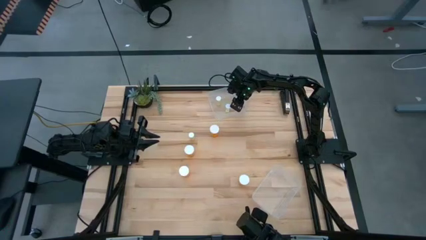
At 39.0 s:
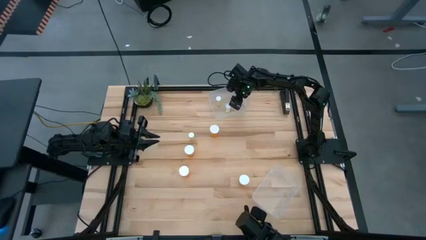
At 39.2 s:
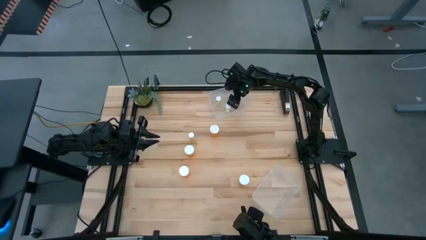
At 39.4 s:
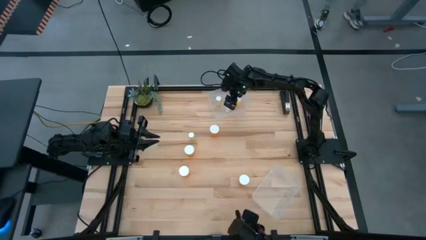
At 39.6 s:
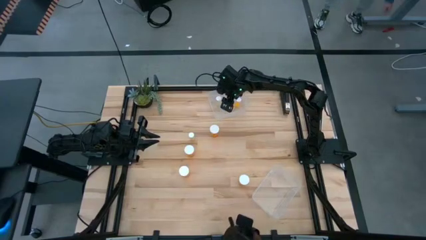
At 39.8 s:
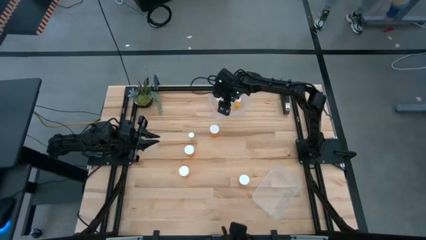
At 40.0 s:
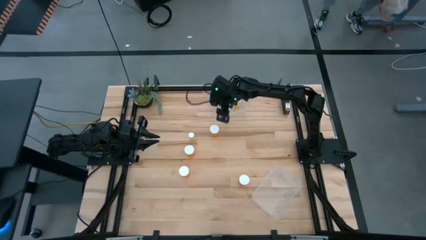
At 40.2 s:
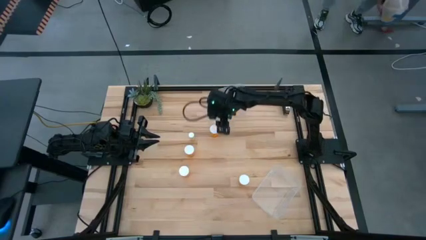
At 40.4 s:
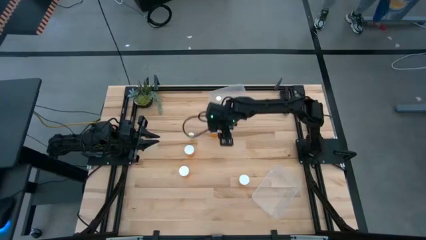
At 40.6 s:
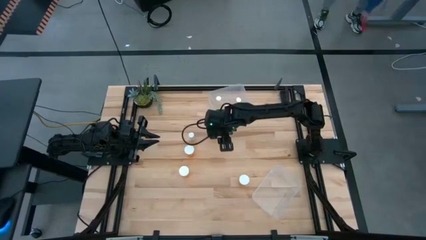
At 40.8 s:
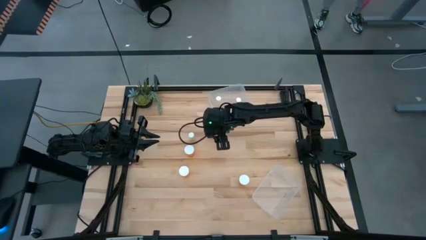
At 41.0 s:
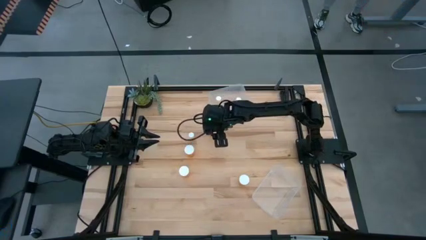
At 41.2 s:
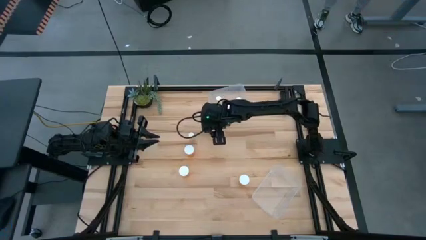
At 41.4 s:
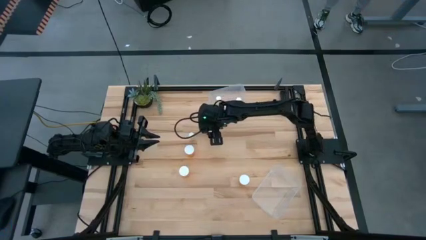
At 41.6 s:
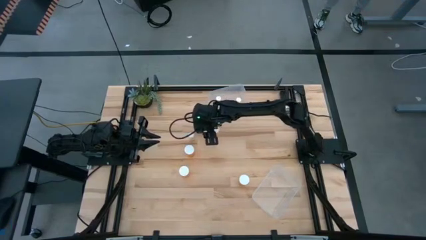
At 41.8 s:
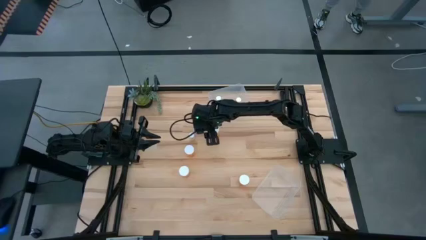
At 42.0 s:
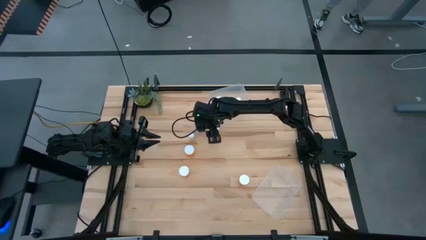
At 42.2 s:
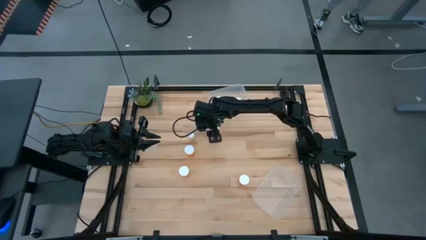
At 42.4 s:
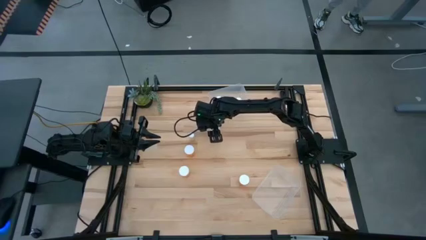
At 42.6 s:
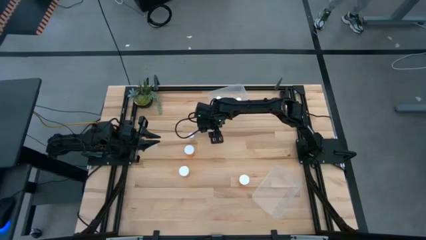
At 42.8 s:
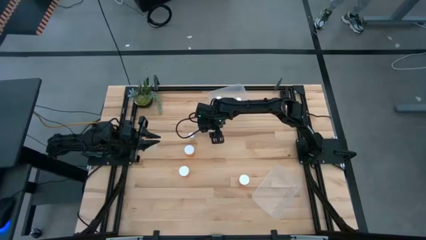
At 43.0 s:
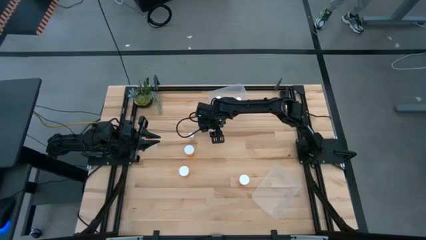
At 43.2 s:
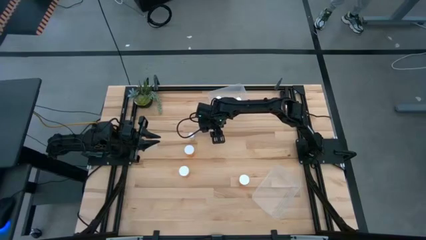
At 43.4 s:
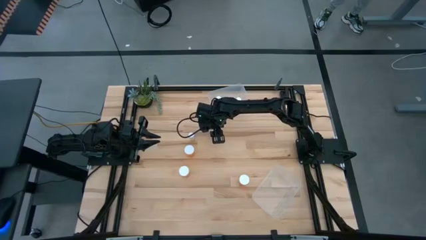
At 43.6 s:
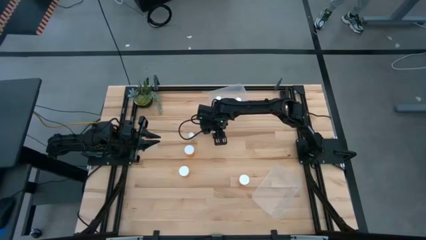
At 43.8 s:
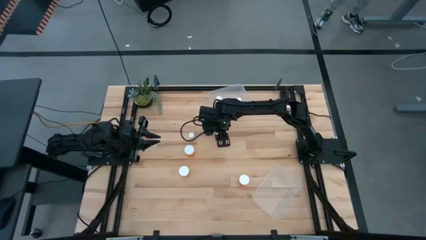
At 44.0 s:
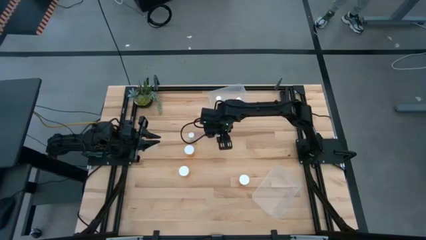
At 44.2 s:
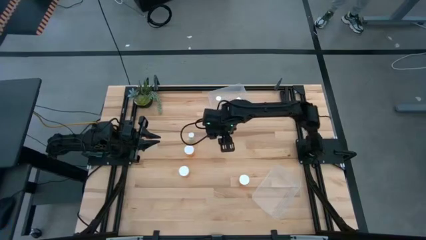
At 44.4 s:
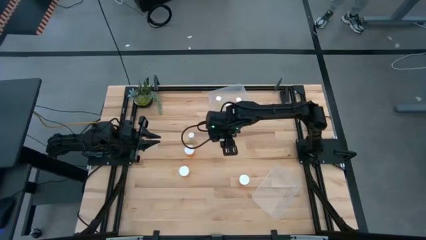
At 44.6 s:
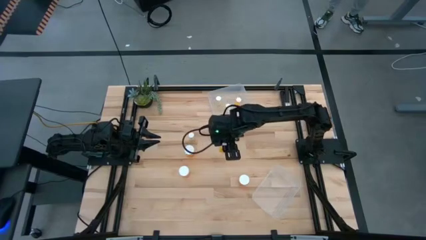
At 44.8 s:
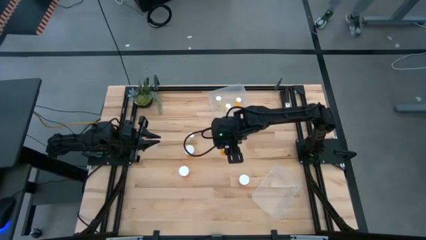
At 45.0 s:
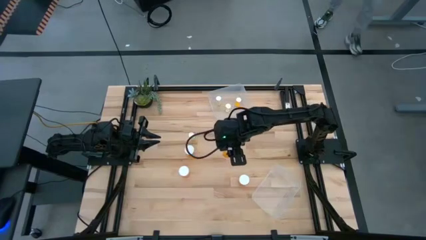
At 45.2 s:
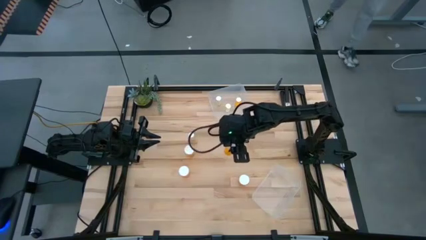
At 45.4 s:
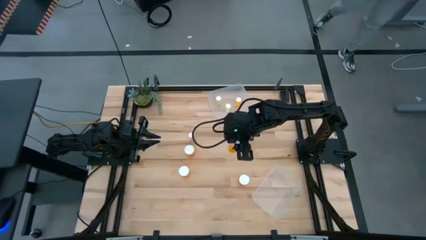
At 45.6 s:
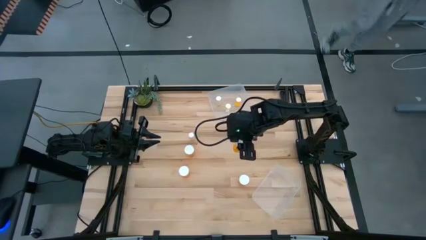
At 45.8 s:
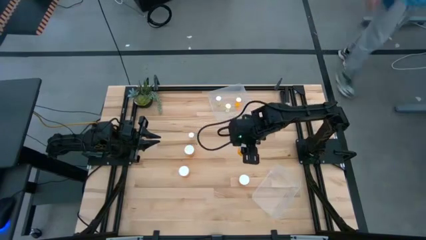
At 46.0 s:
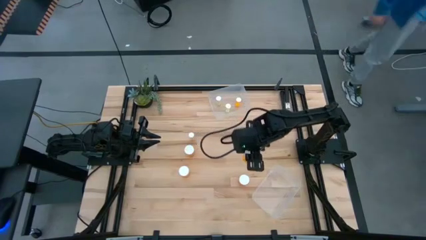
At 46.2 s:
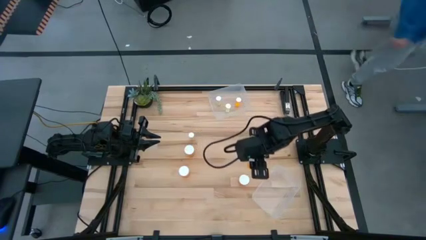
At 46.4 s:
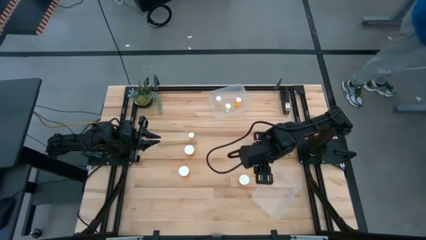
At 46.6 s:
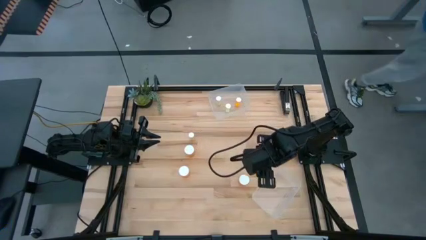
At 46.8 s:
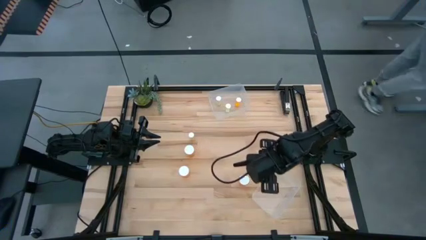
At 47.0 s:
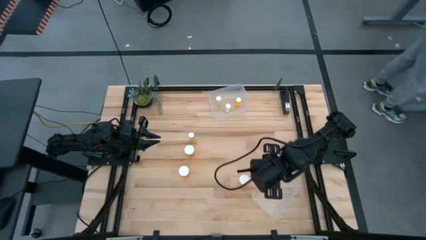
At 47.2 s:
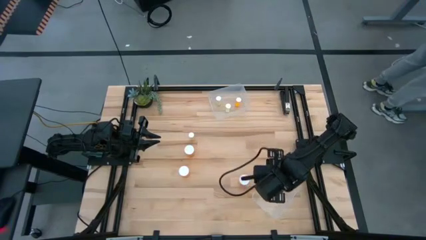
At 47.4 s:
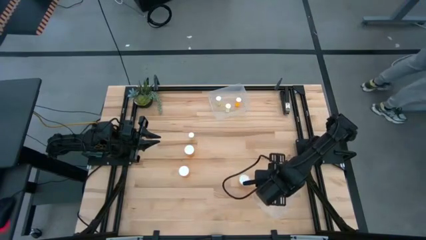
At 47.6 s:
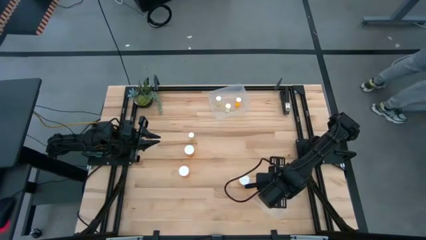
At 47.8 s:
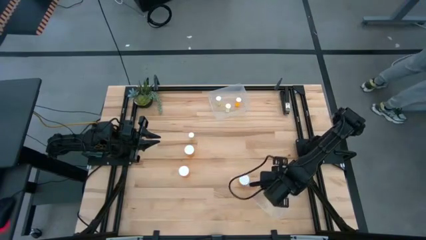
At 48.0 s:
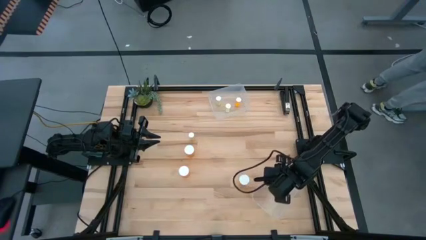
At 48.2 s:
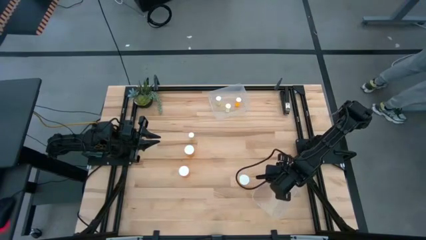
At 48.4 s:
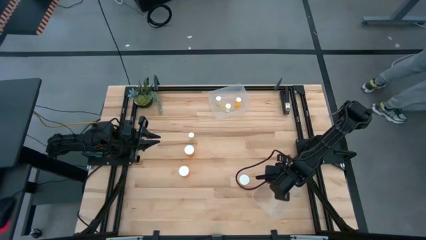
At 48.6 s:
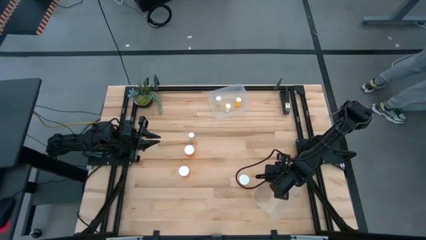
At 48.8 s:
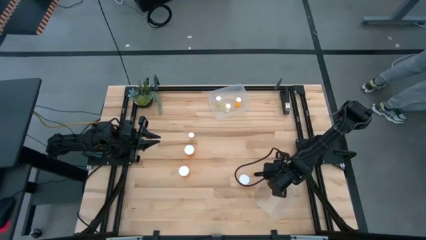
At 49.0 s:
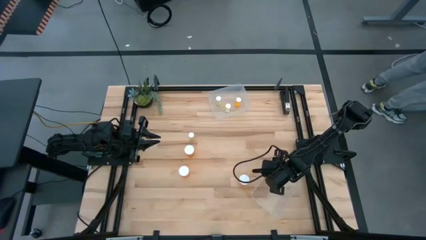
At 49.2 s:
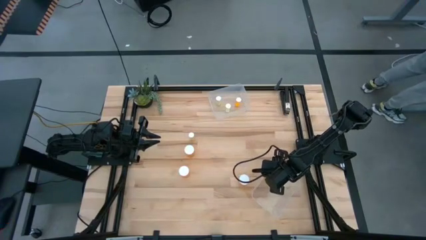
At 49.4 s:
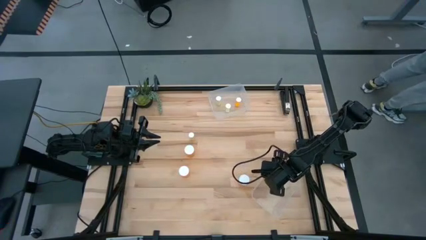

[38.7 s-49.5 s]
Task: Pick and place medicine bottles into bin by pill shape (circle, oval)
Put the large orange pill bottle into the bottom transparent bin
